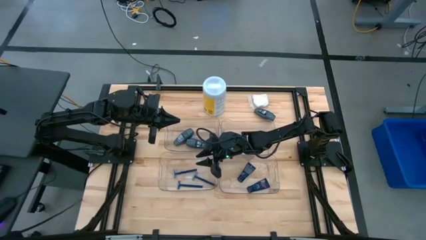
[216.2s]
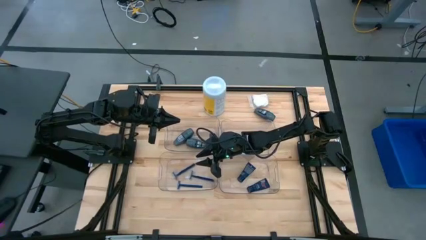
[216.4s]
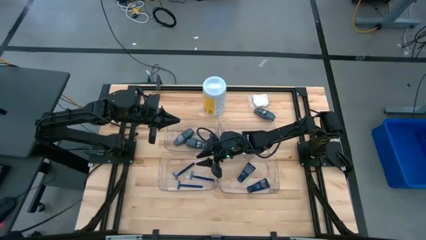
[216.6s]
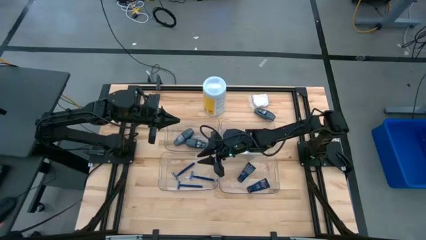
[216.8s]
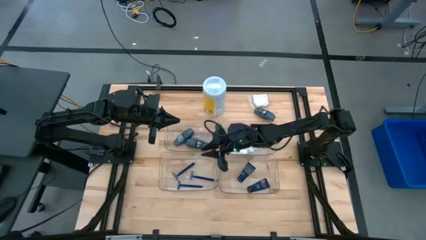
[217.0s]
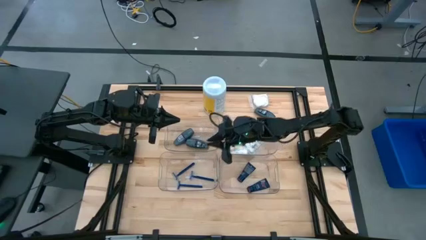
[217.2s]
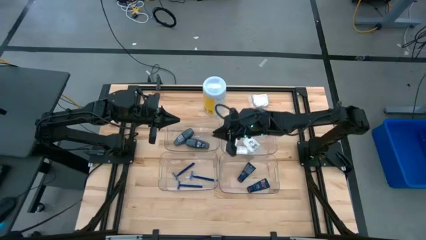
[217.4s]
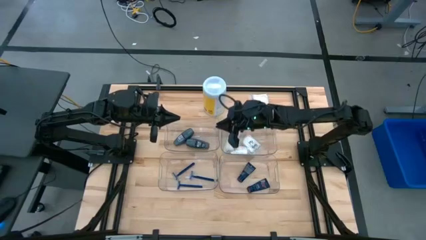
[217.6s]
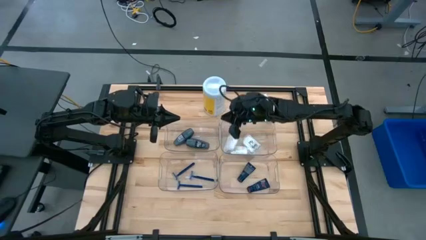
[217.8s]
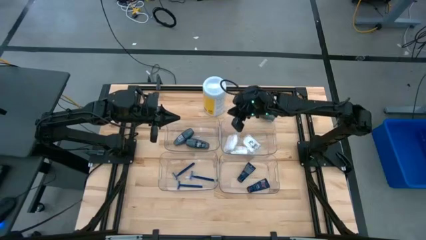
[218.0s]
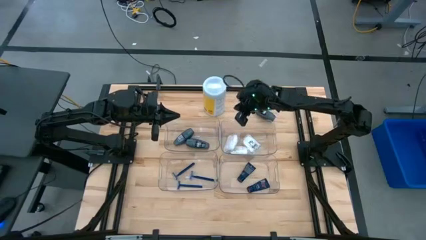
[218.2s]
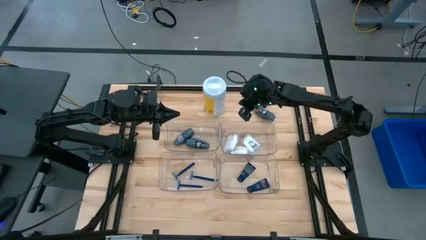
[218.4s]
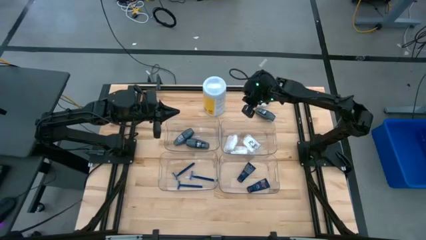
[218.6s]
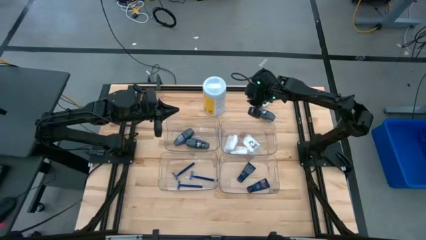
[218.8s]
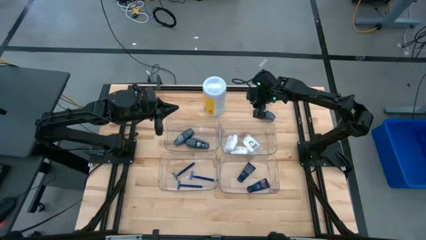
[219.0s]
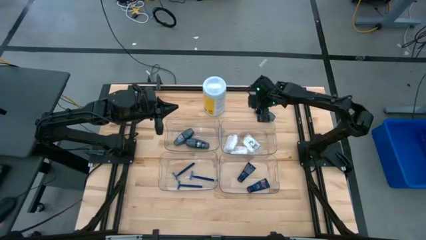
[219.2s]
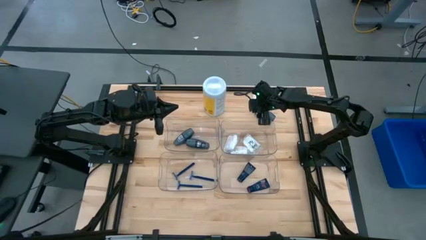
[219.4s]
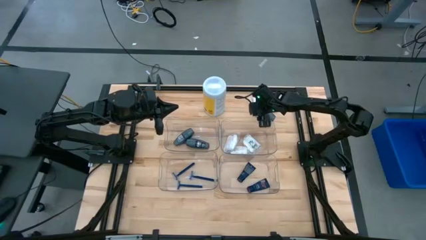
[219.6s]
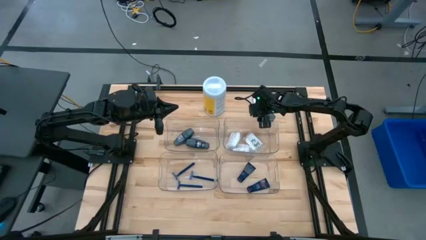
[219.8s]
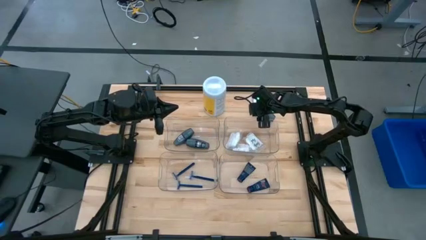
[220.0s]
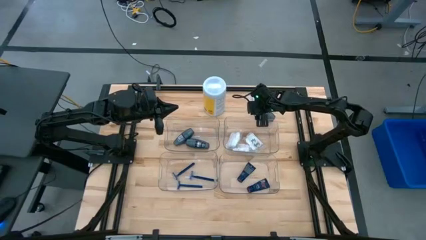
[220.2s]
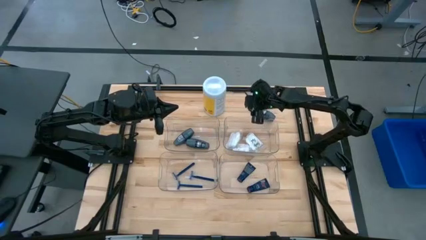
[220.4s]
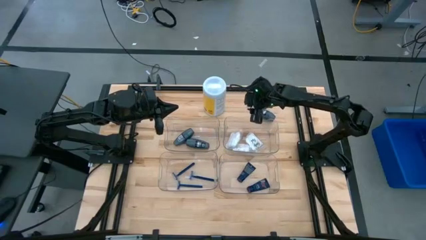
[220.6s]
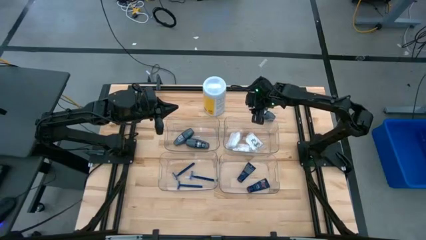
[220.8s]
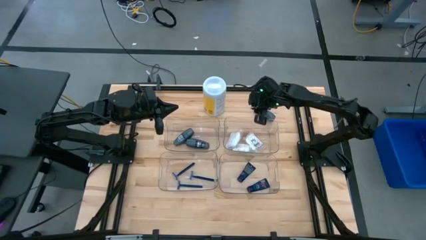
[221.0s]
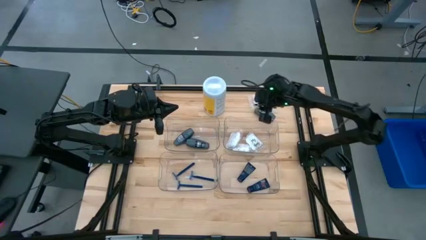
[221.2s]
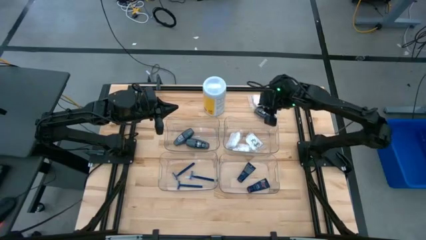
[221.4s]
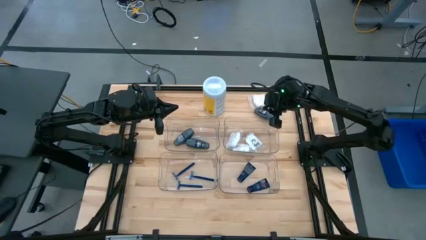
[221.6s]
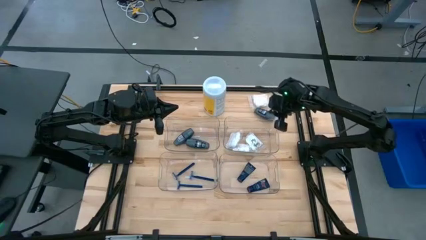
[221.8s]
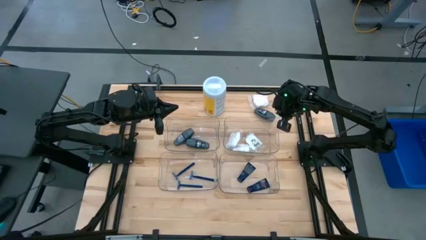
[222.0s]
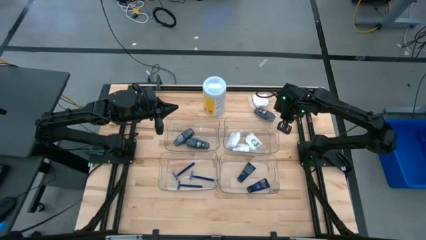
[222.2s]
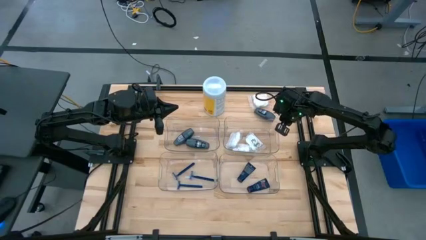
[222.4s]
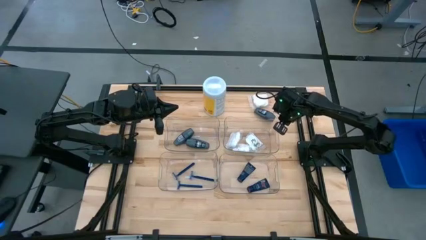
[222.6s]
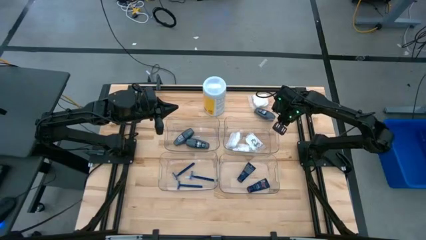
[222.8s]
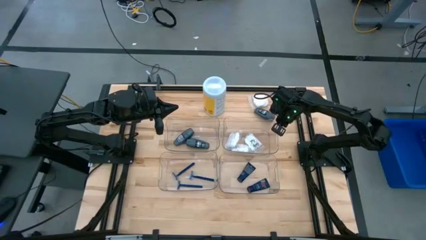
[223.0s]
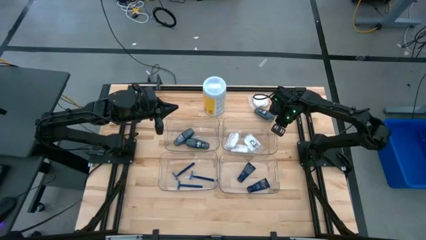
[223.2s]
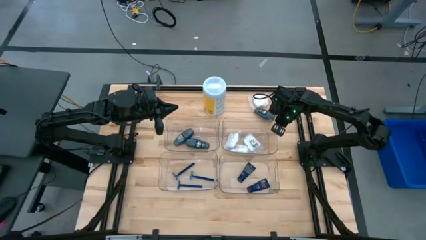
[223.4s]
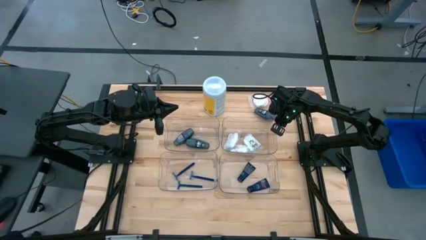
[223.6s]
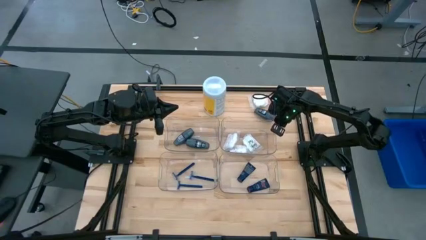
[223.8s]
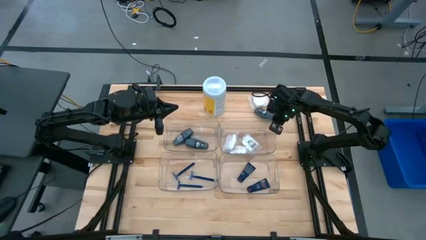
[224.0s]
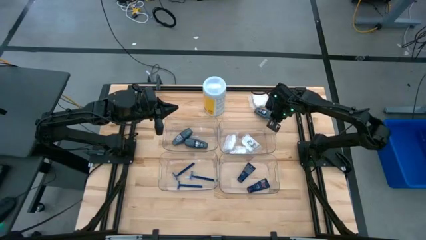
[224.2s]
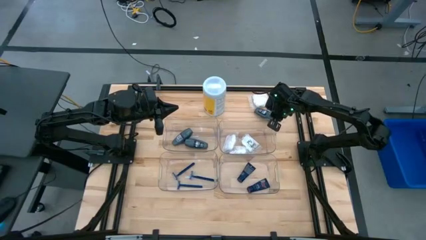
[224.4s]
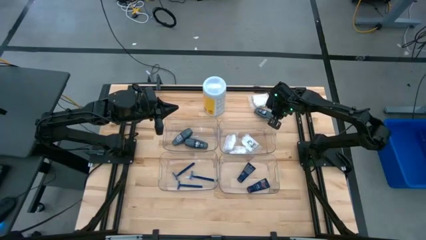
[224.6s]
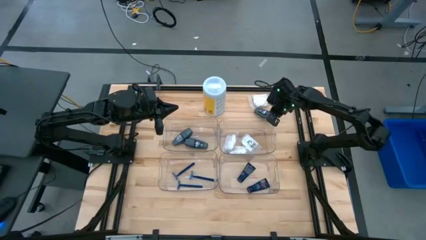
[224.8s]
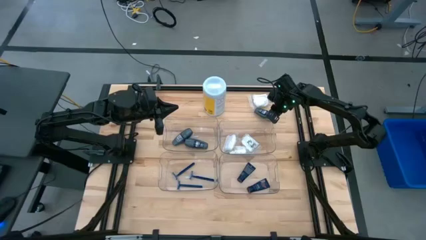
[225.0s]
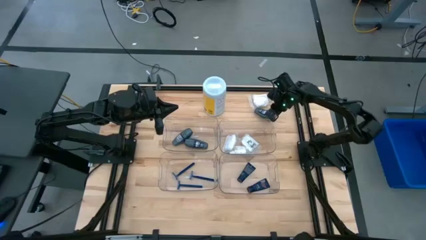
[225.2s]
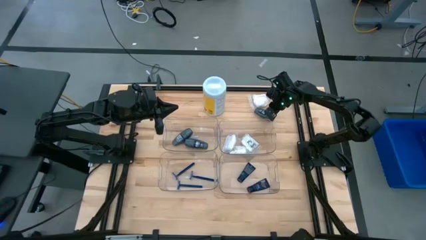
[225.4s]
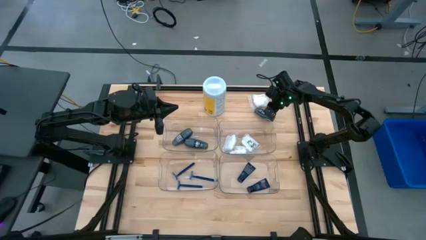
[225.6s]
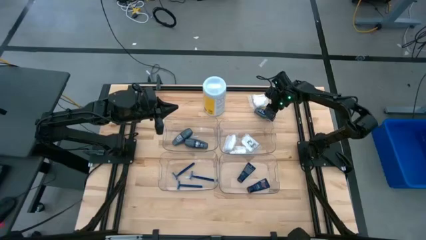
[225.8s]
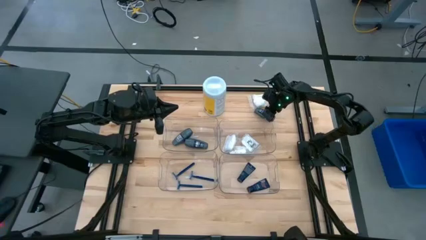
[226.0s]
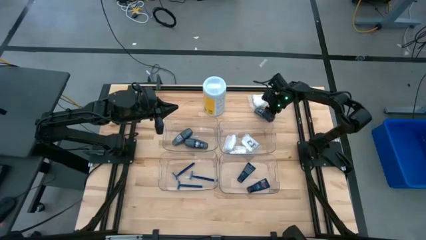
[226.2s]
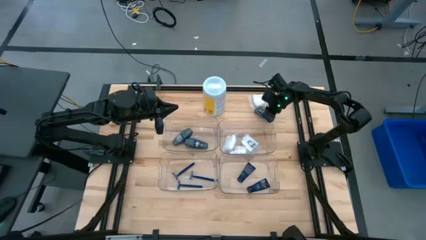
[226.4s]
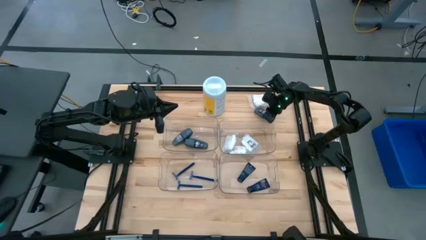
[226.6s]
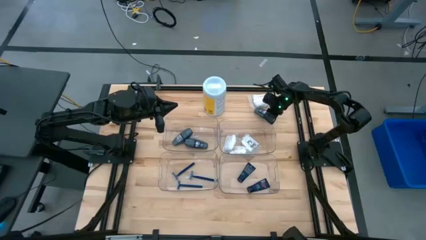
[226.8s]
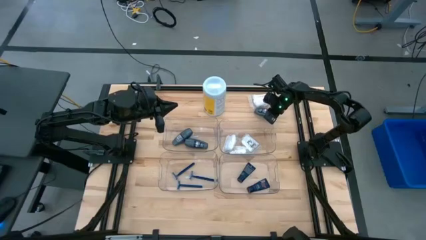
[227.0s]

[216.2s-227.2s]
Task: Pick & Place Travel size toiletries
Put the black deodorant into the top left transparent bin

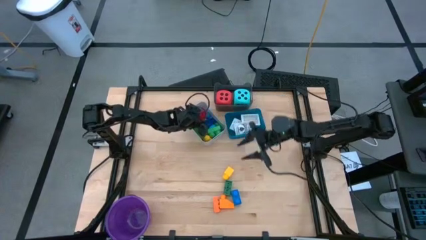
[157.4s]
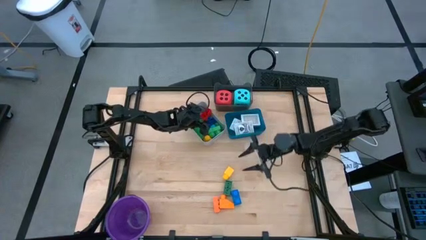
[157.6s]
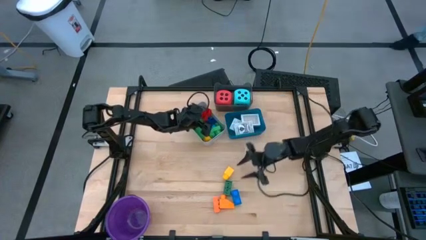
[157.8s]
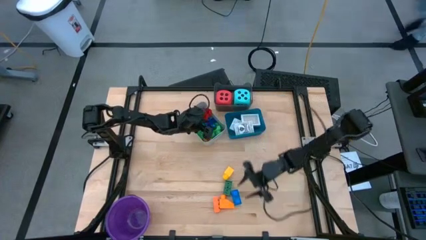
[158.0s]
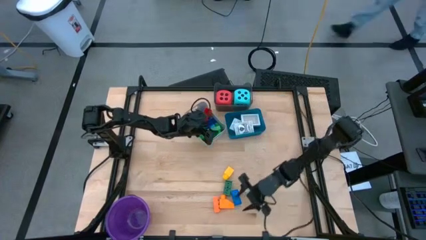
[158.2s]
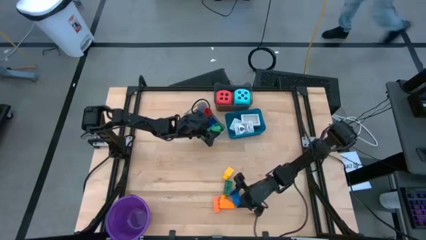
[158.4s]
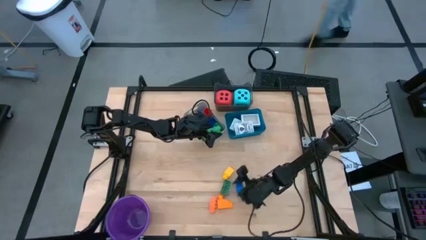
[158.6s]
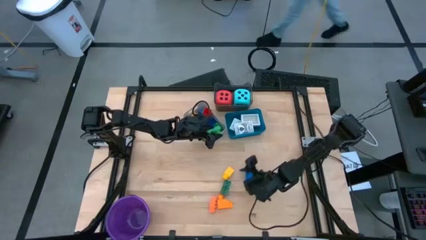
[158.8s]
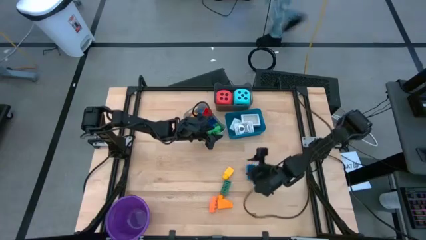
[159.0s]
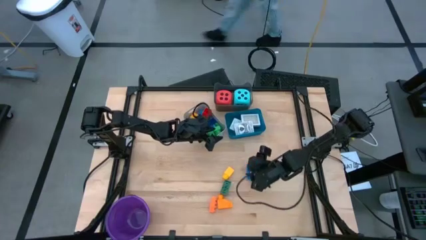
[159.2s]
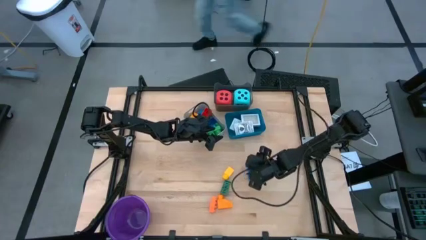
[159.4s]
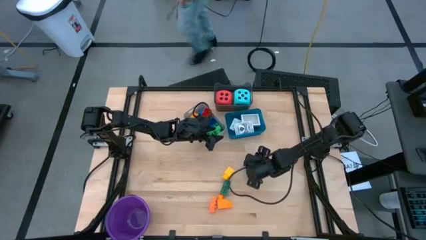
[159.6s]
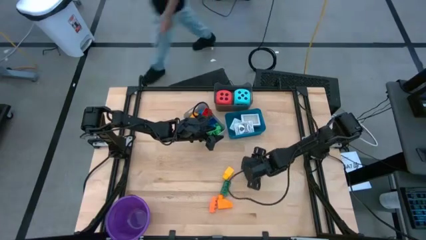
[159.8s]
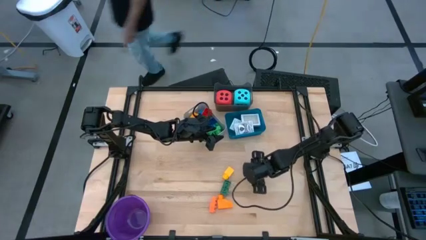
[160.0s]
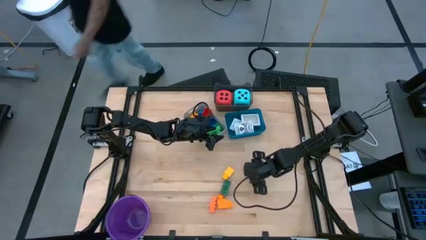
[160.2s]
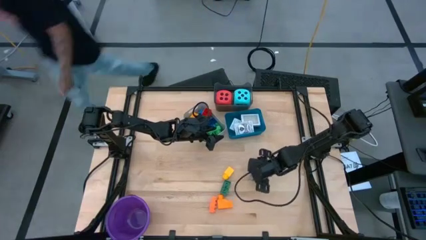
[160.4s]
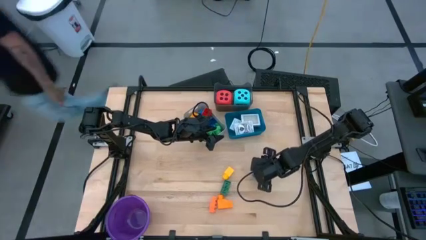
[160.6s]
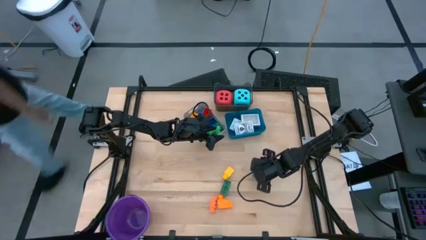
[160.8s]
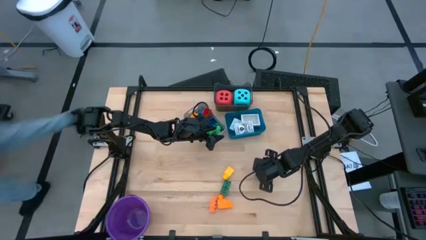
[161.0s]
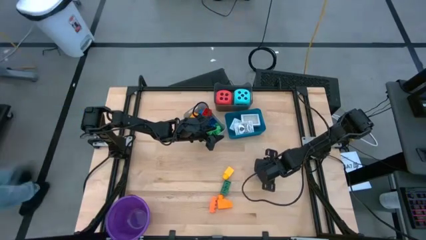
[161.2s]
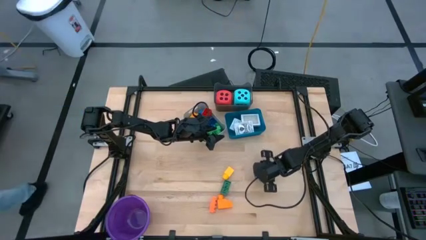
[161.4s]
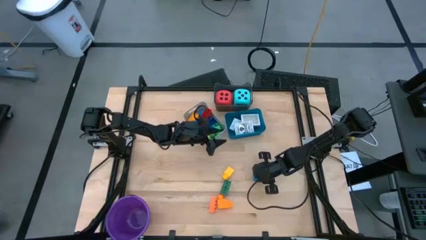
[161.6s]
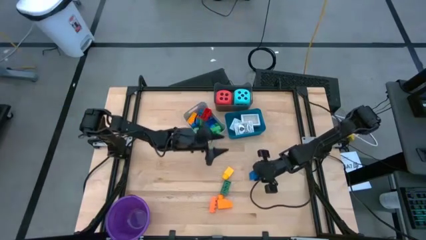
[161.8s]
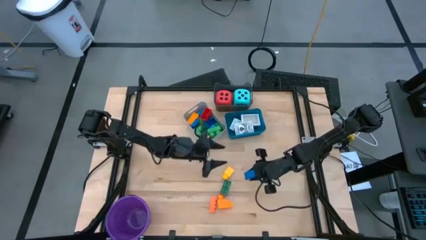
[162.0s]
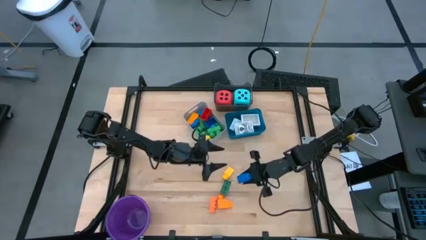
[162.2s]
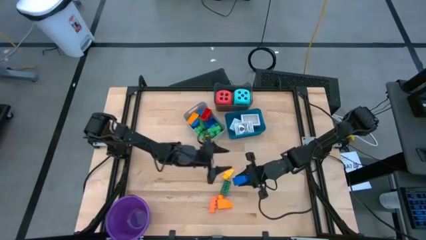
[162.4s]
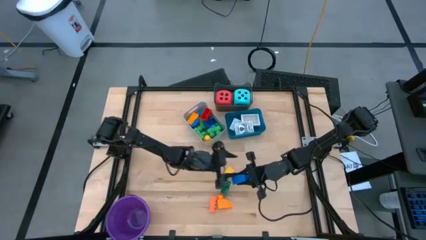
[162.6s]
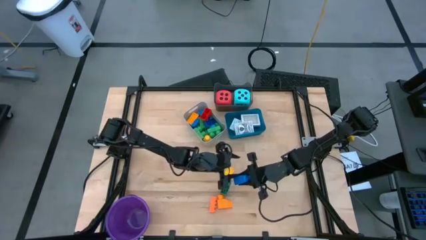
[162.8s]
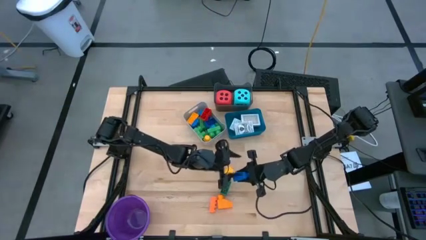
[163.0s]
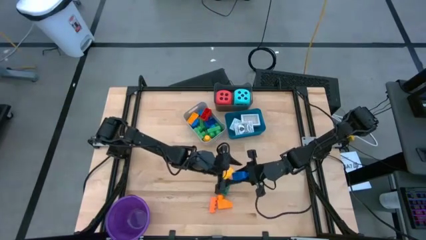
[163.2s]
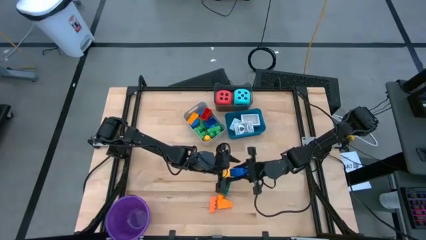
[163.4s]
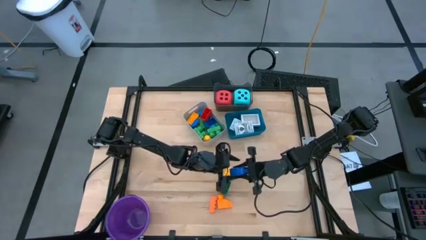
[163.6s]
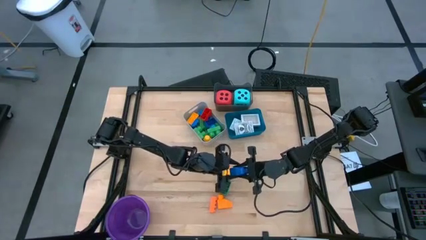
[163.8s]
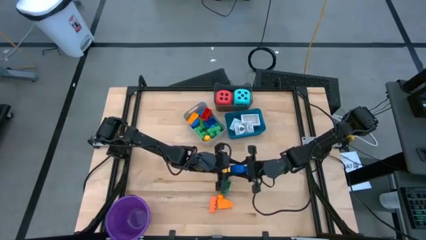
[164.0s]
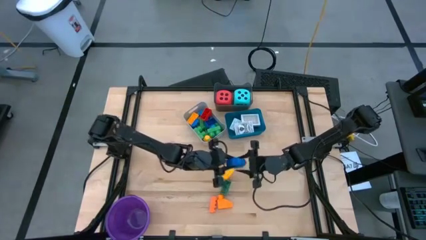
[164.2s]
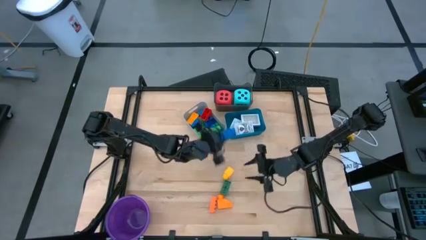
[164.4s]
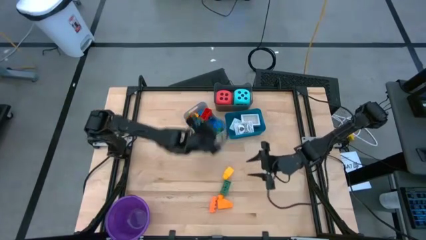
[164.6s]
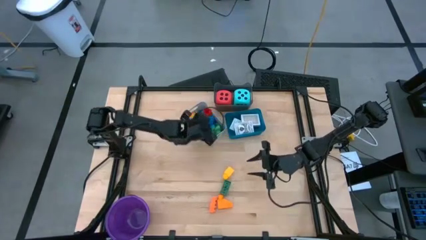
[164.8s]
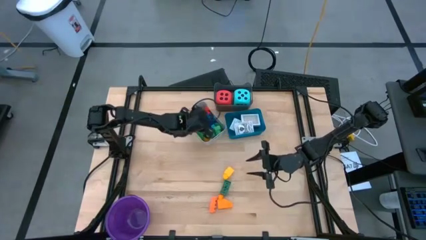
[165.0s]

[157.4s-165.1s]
Task: Pick & Place Toys
Put the blue game piece into the gray bin
